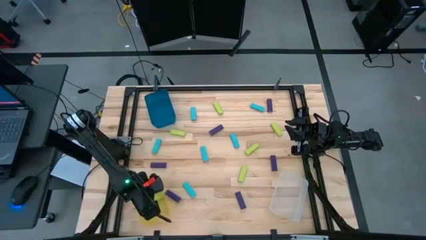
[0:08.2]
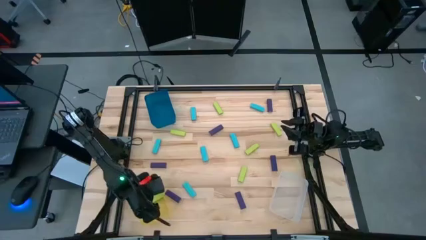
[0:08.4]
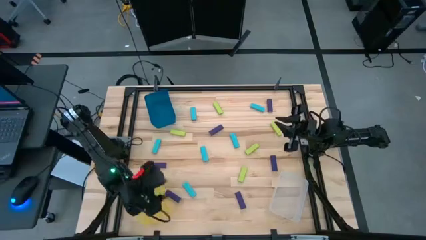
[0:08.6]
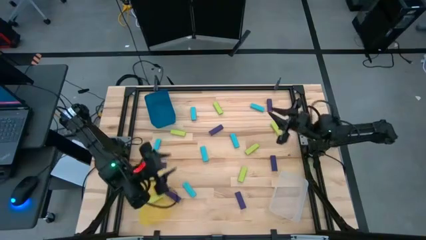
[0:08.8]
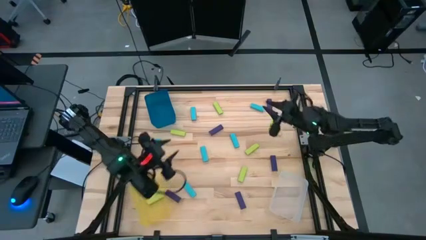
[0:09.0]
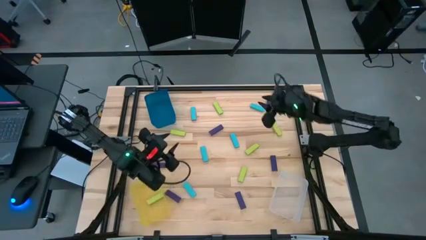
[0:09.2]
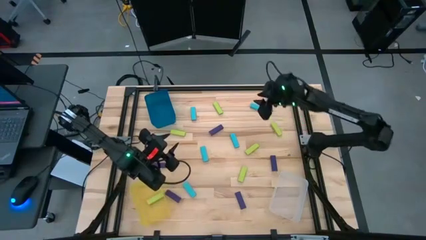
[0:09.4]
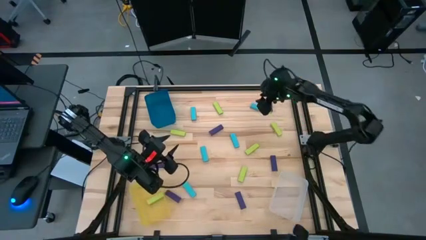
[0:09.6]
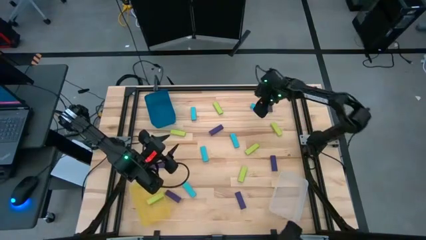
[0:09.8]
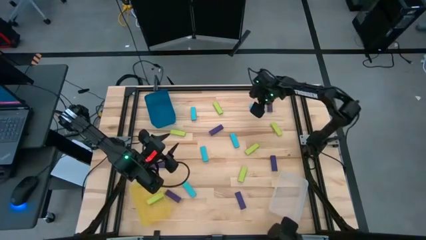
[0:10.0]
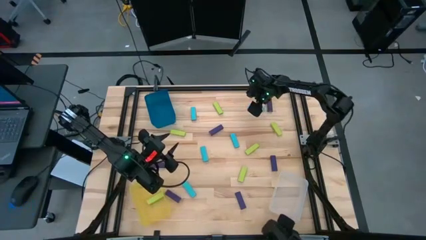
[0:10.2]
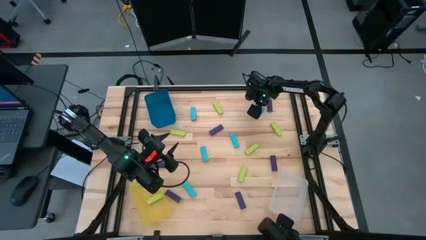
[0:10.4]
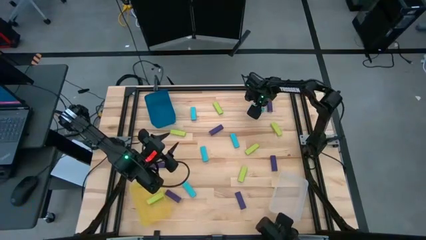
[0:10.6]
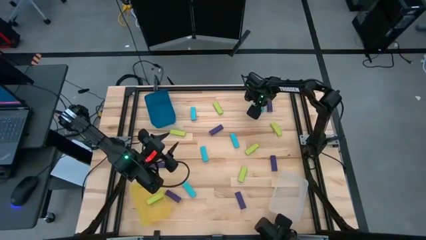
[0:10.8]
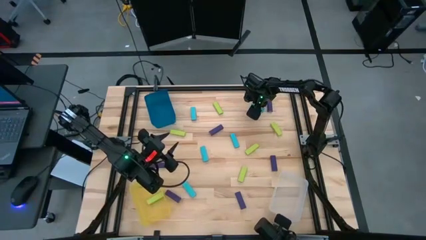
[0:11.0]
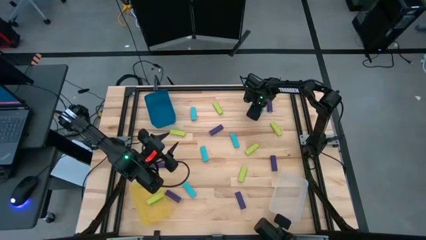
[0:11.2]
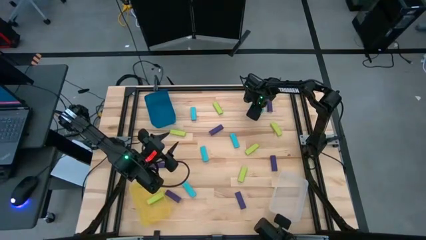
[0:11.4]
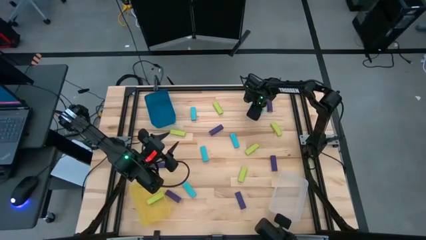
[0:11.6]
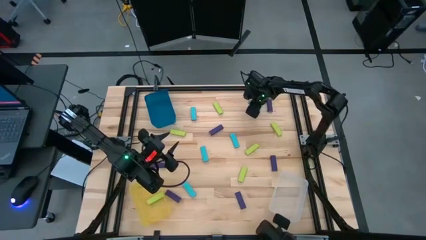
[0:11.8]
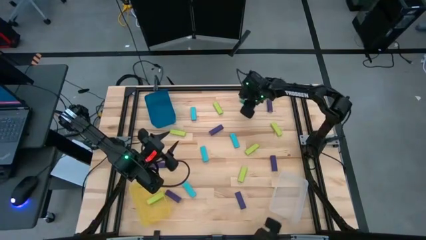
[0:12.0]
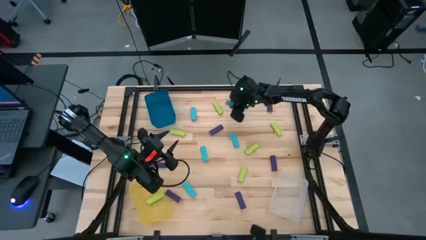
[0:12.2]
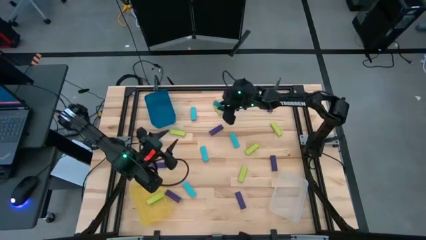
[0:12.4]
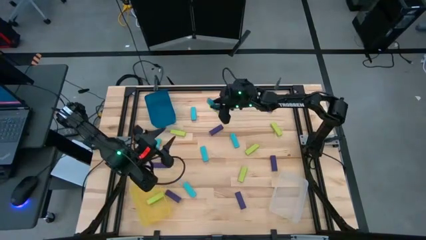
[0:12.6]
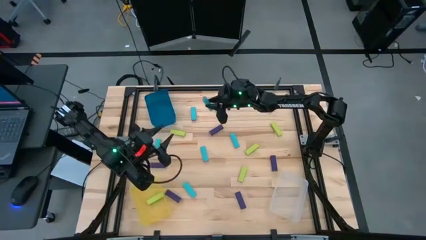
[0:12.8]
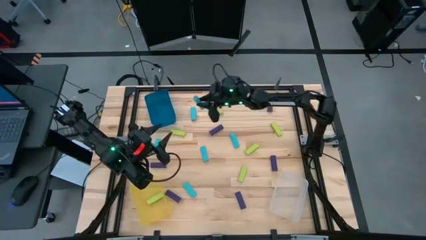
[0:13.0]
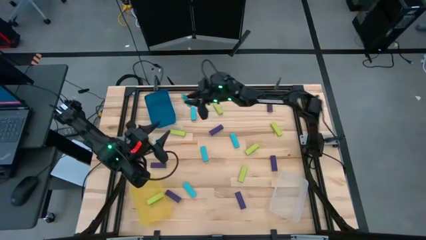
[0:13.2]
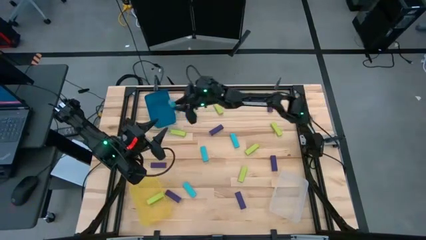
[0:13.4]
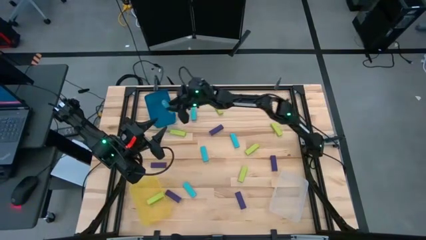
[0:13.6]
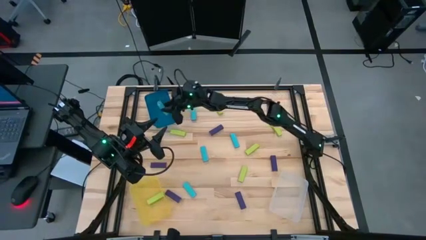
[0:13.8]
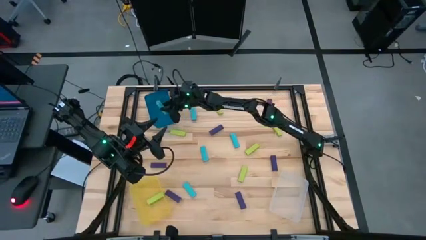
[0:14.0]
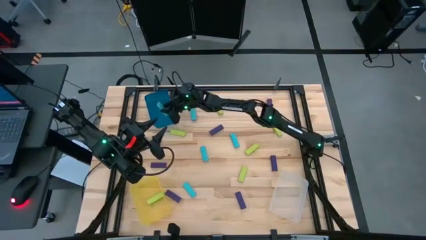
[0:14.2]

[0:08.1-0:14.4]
Task: Sort blocks
Put the blue block into the blue bin

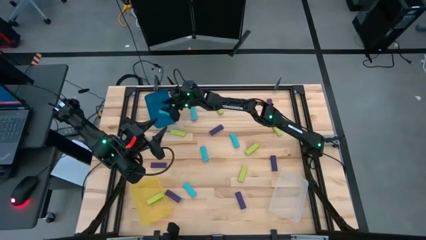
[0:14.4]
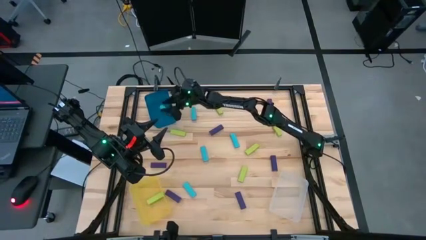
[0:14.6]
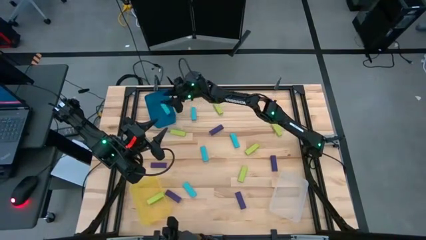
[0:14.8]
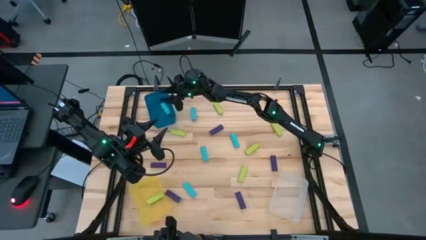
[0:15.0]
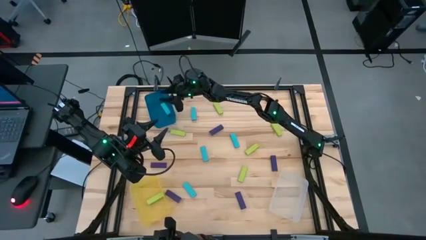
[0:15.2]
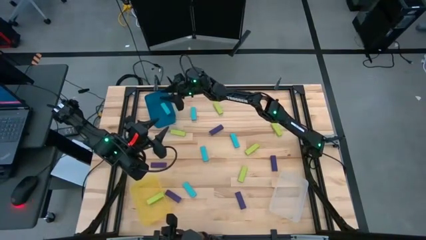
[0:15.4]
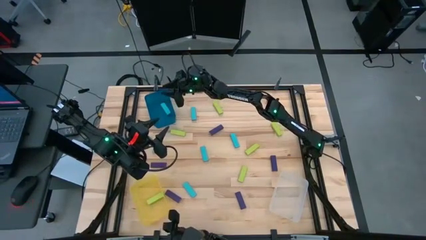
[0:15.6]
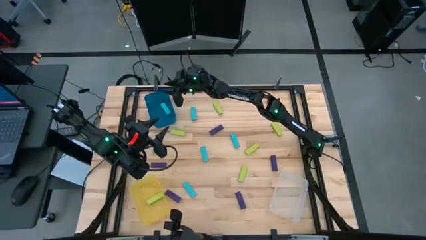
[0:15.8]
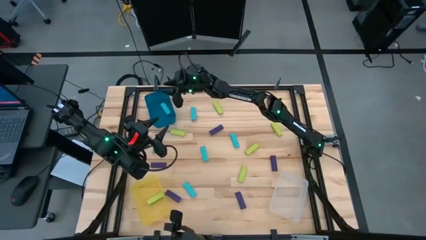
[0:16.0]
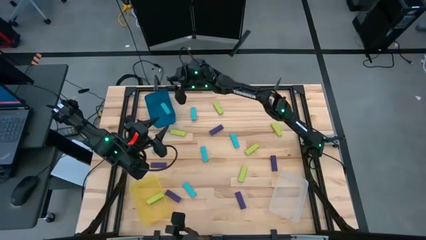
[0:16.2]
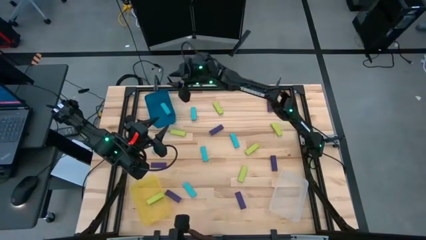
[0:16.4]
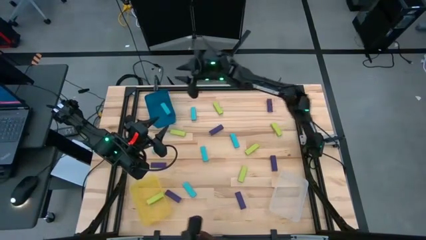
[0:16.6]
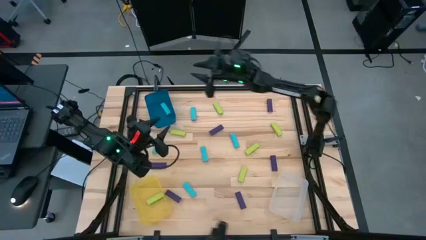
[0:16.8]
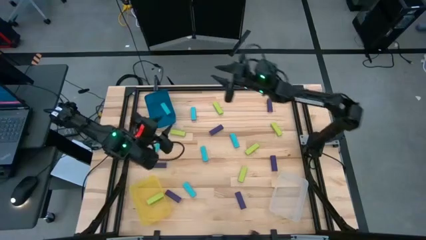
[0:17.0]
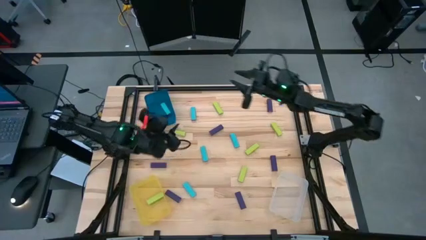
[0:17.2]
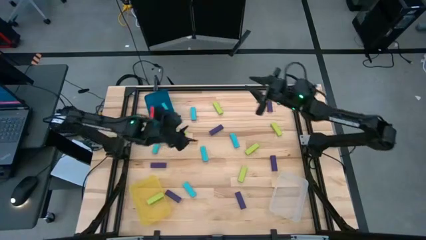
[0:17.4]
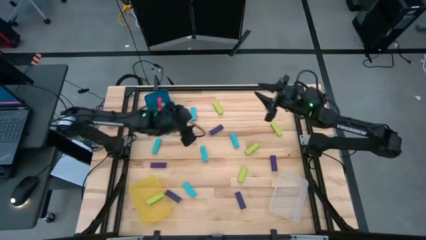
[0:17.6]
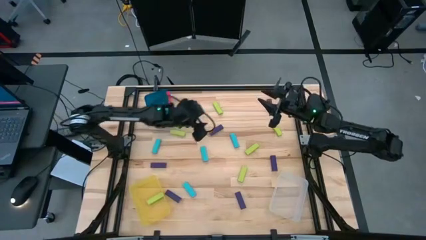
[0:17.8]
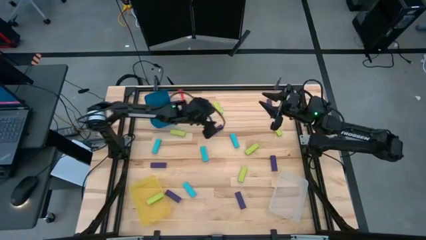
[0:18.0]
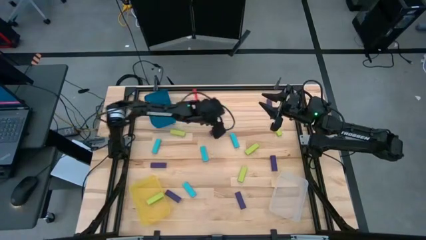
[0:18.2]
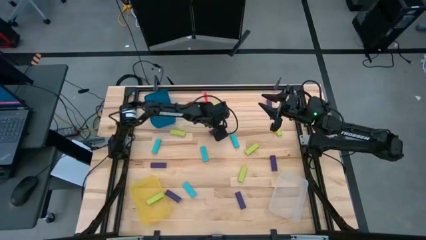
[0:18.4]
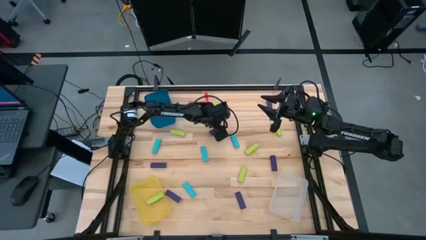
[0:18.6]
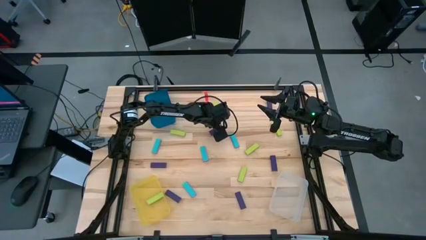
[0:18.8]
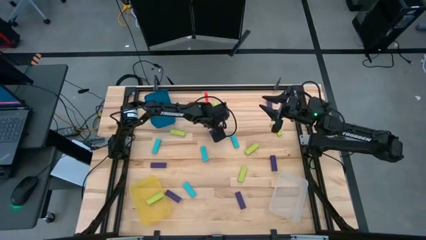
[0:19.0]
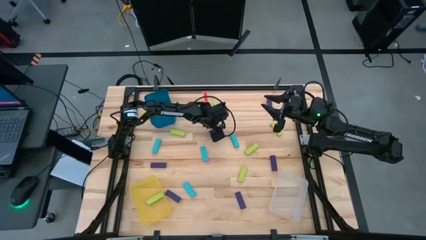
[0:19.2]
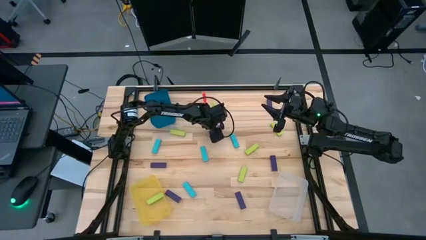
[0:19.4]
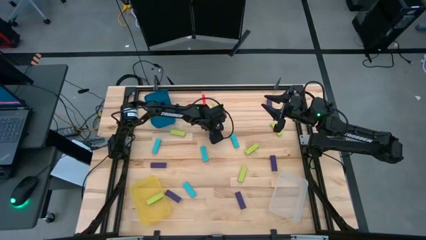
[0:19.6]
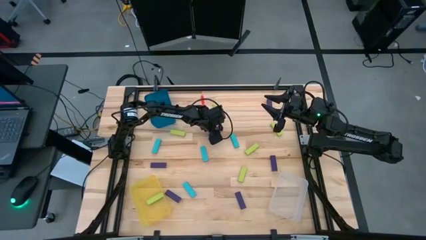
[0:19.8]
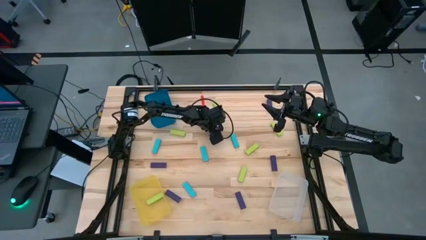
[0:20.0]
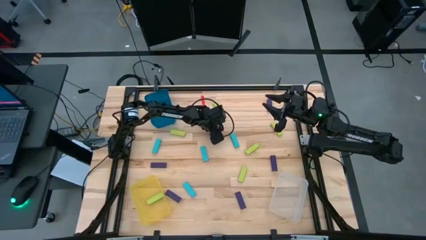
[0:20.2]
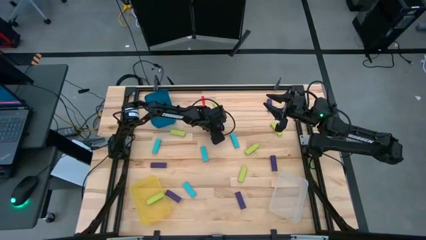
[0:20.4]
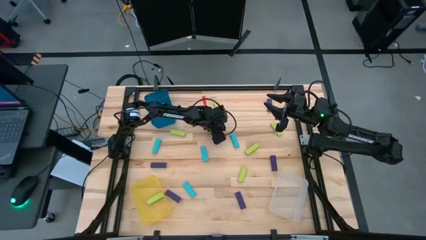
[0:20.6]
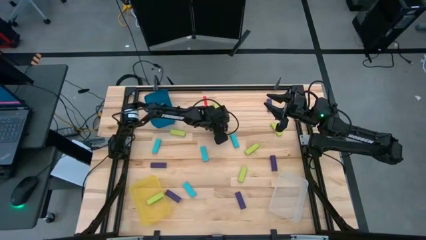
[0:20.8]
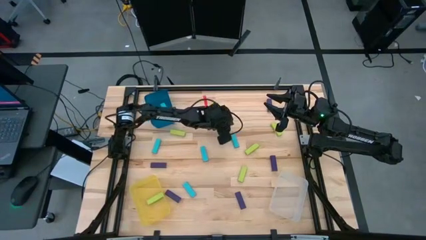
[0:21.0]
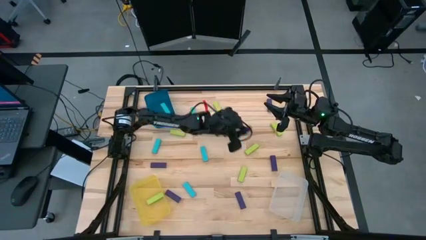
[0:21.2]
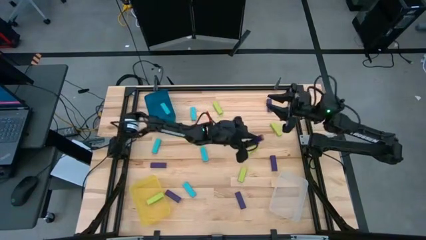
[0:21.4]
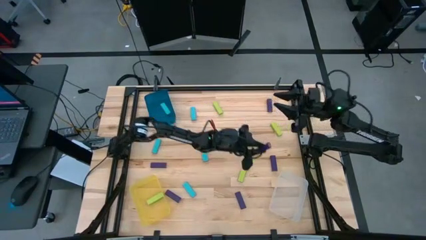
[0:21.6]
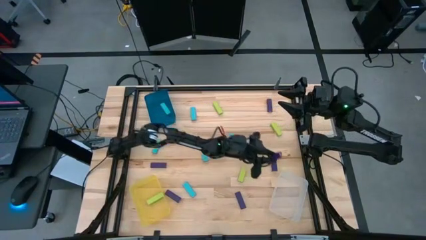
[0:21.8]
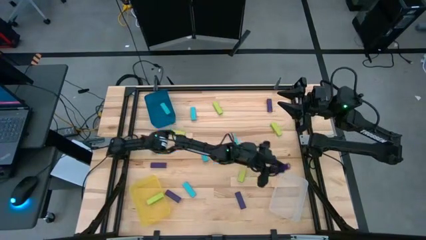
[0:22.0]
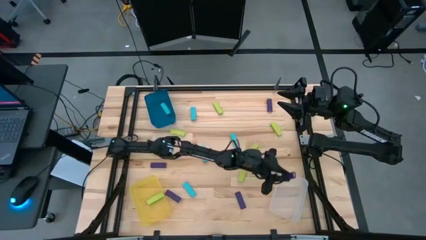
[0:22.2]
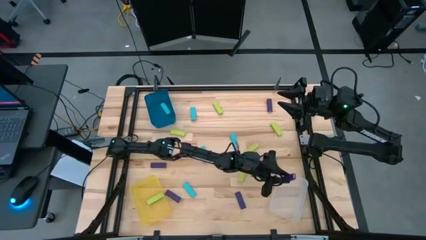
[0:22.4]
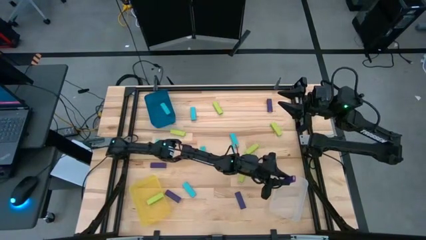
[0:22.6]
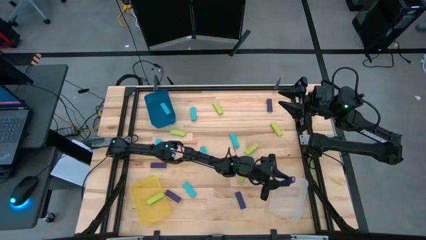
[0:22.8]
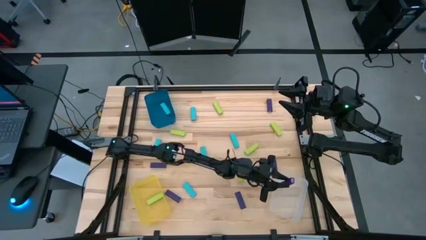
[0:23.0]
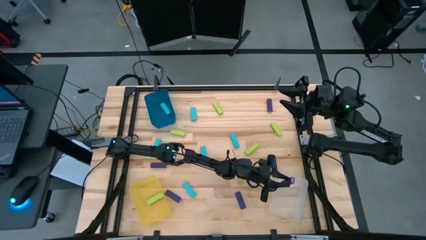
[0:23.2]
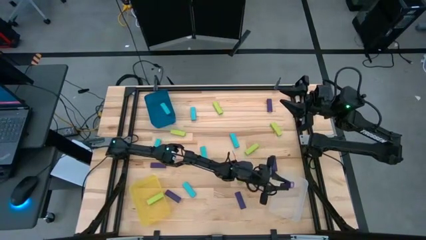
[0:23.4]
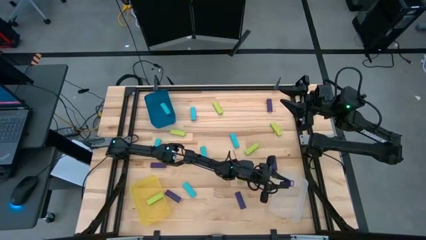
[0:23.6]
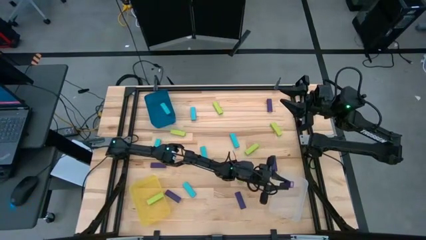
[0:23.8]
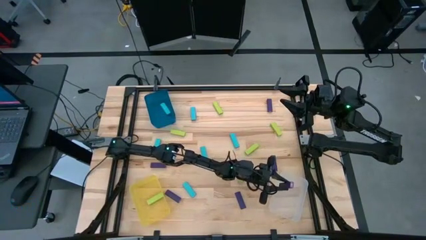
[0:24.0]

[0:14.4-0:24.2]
Put the purple block into the transparent bin
